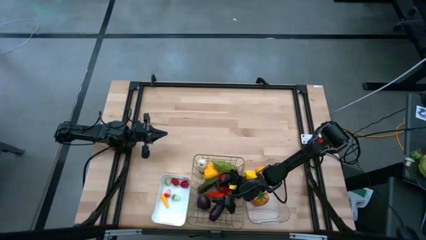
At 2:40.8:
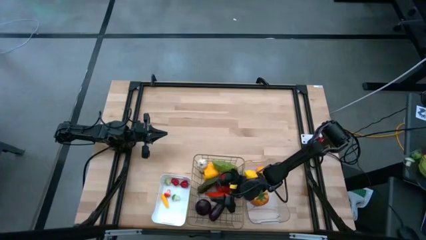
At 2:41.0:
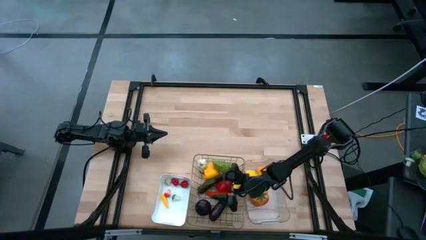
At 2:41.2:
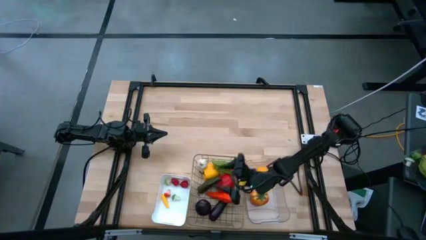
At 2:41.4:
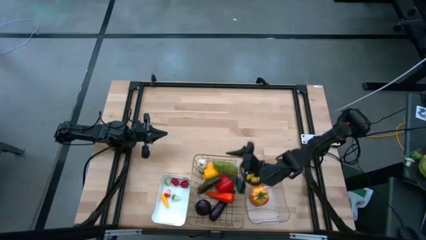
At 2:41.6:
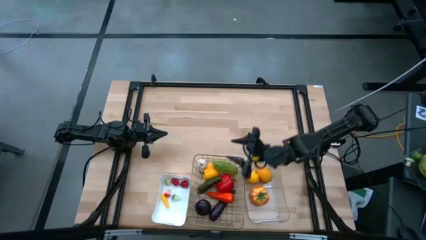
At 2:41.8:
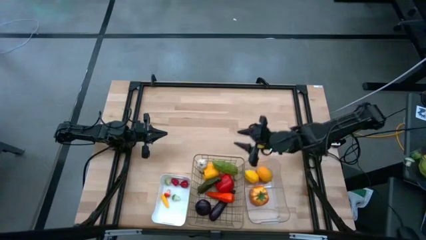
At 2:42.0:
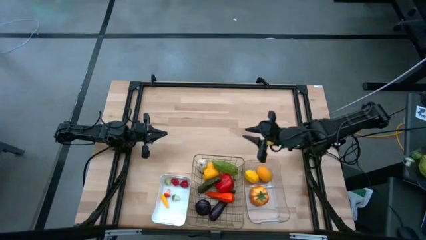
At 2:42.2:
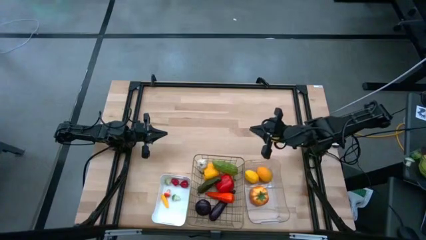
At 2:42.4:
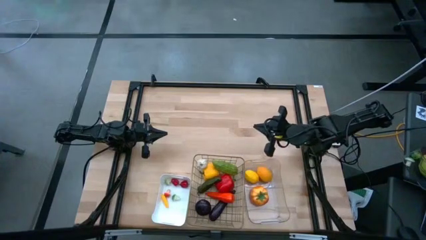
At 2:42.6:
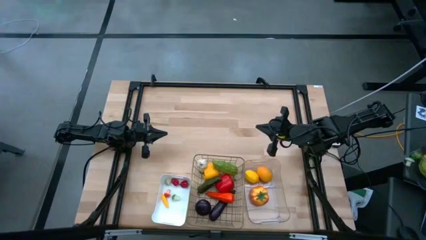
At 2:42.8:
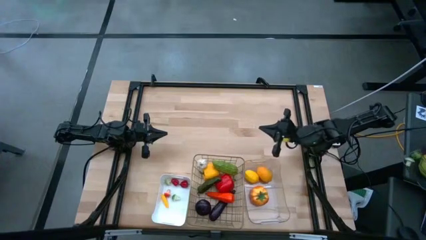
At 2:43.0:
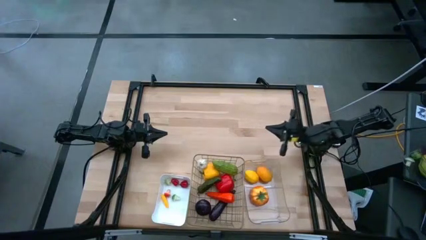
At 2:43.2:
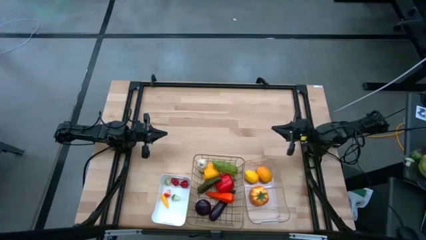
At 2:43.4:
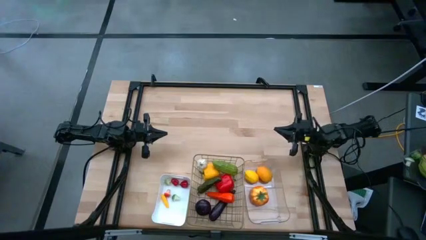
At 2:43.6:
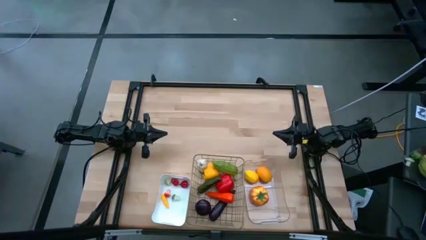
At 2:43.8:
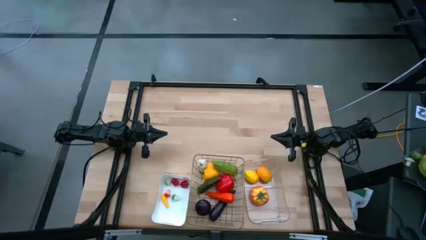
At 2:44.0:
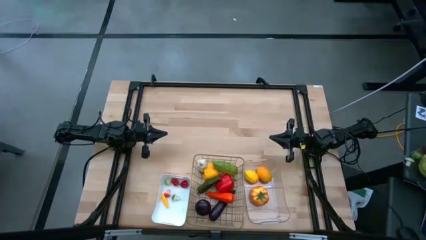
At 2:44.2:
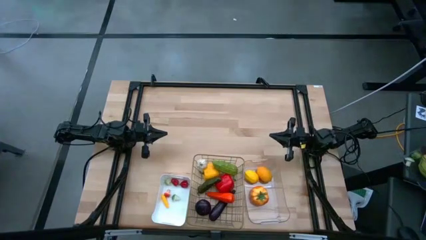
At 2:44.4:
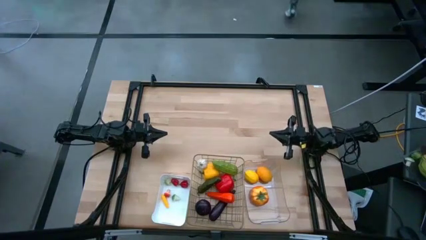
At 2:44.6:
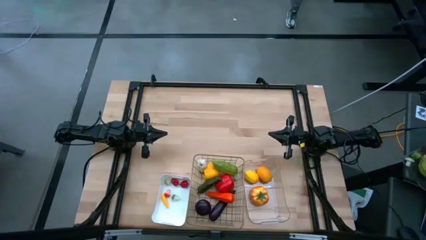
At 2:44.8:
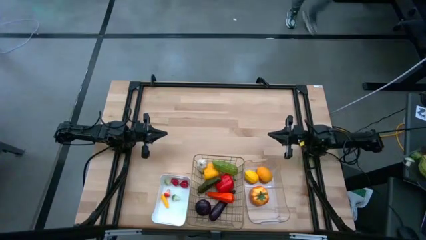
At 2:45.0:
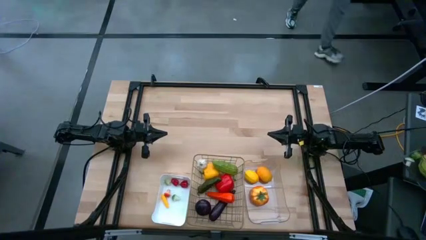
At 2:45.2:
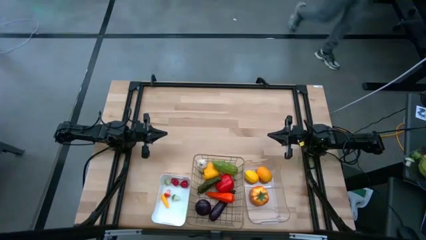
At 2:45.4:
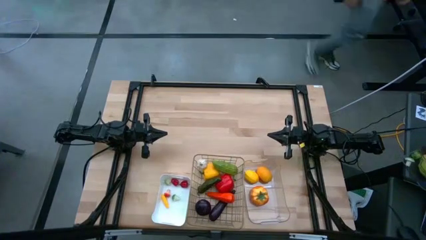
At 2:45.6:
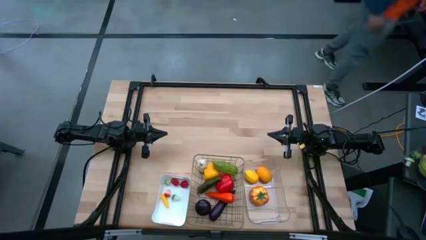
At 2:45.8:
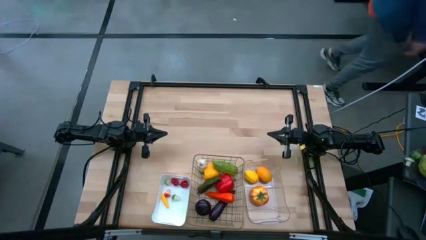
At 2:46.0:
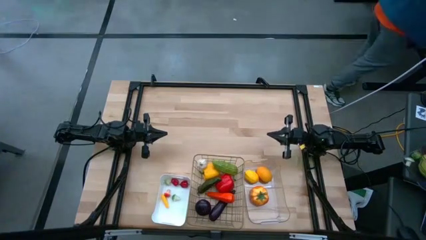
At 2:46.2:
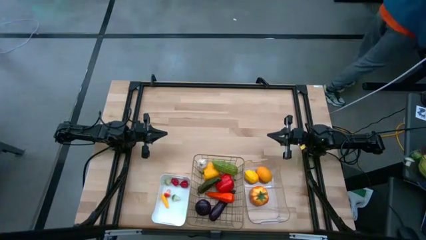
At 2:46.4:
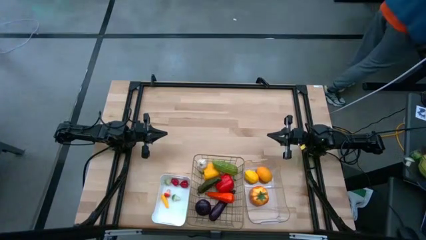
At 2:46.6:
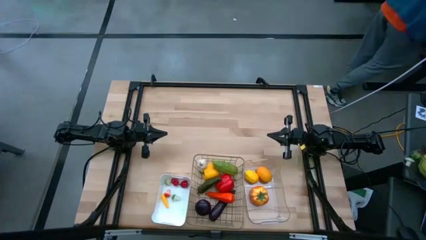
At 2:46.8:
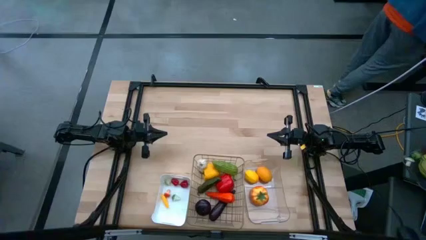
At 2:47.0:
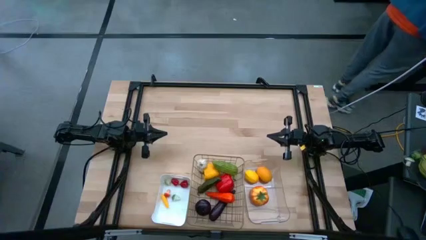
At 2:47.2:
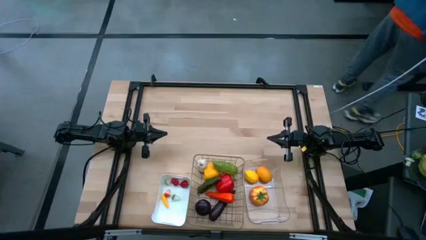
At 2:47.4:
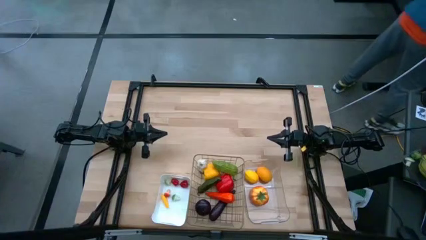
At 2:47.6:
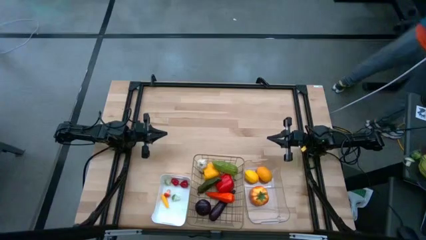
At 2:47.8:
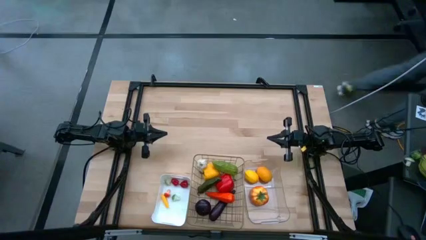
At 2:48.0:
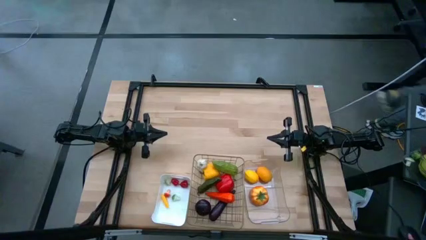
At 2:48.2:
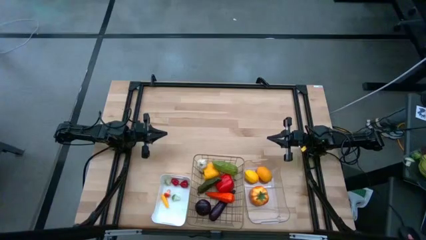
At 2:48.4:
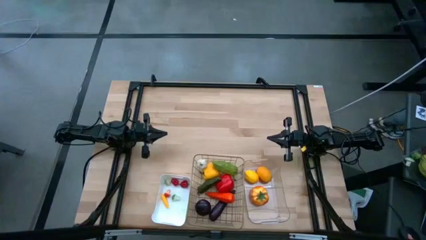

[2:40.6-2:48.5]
Task: Sort produce into baskets
Return to Home Position

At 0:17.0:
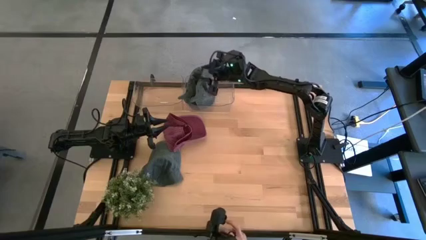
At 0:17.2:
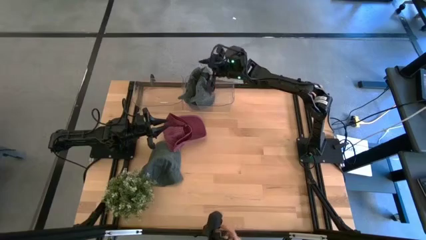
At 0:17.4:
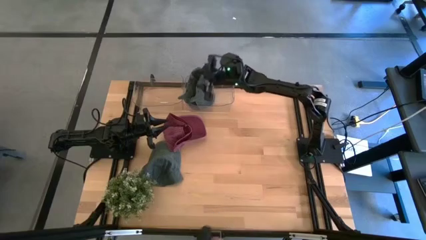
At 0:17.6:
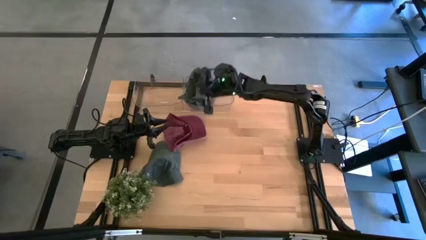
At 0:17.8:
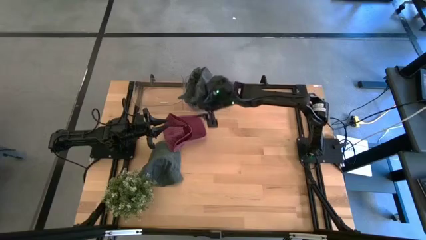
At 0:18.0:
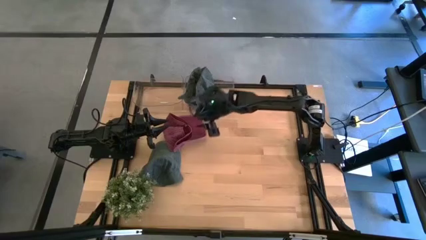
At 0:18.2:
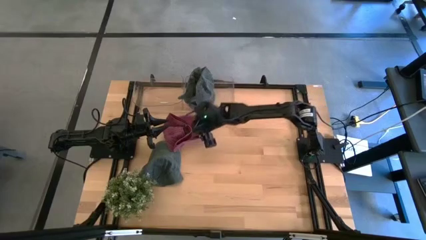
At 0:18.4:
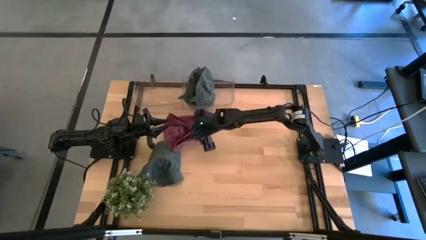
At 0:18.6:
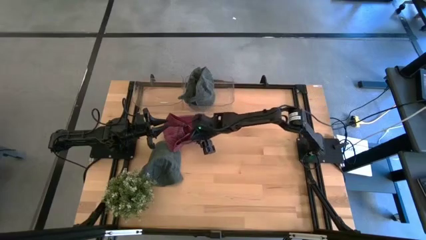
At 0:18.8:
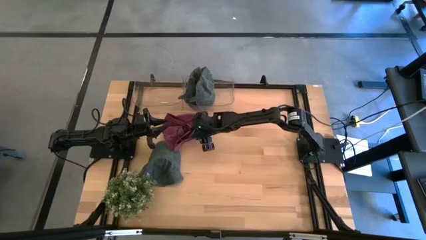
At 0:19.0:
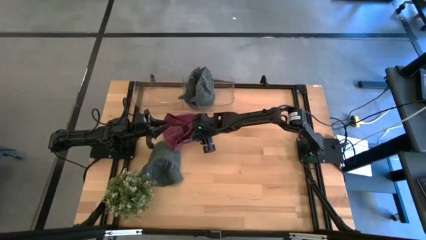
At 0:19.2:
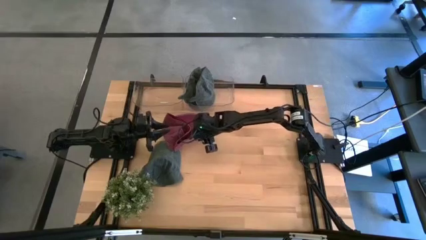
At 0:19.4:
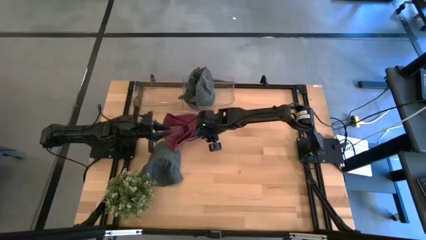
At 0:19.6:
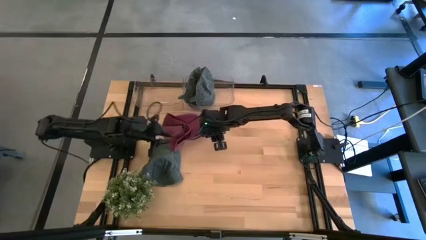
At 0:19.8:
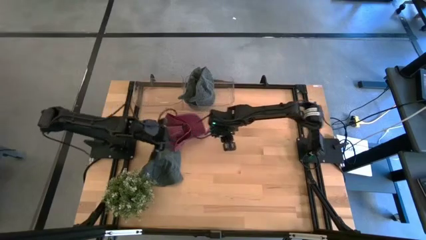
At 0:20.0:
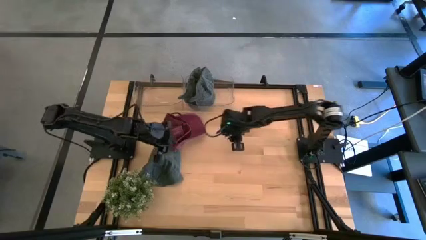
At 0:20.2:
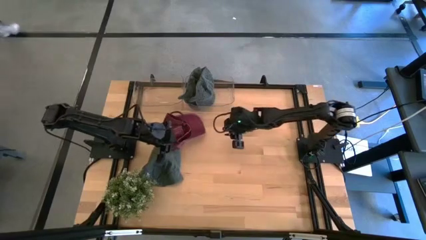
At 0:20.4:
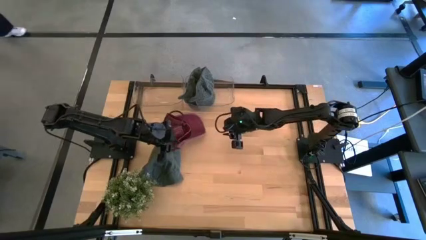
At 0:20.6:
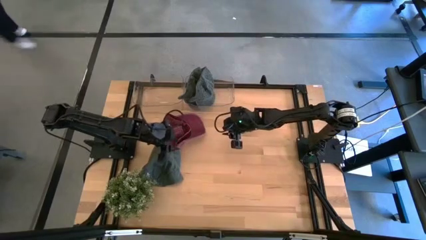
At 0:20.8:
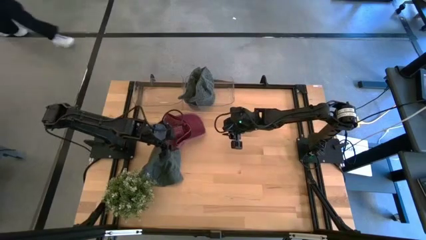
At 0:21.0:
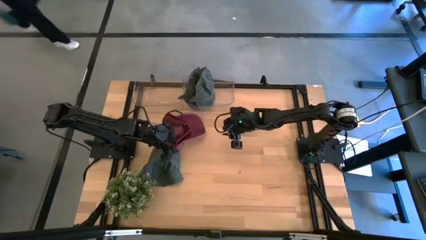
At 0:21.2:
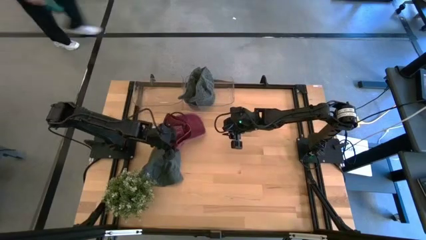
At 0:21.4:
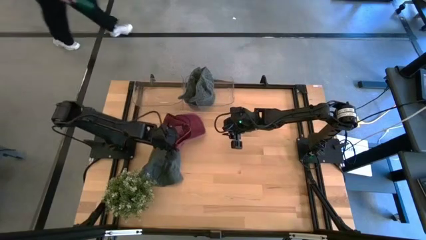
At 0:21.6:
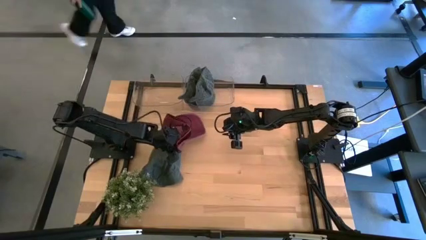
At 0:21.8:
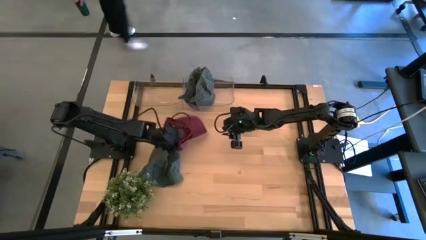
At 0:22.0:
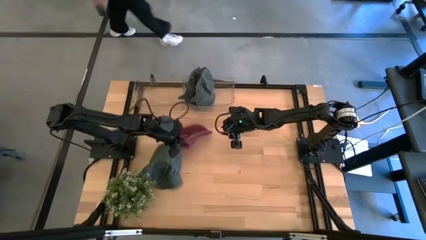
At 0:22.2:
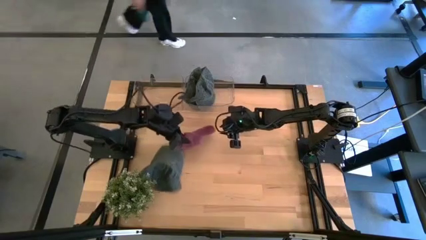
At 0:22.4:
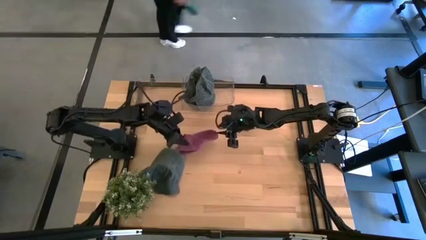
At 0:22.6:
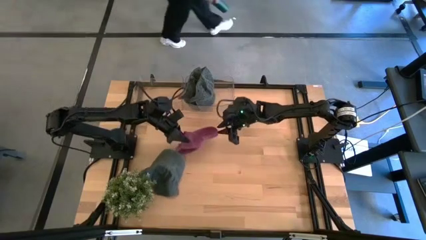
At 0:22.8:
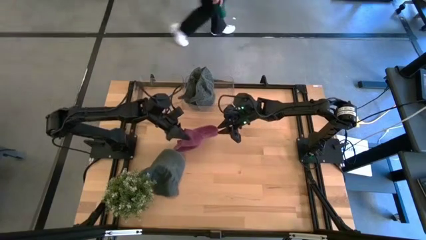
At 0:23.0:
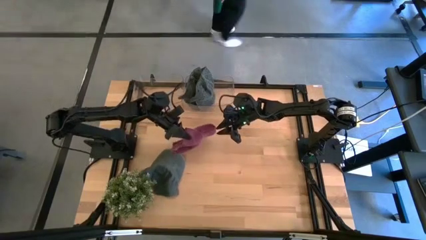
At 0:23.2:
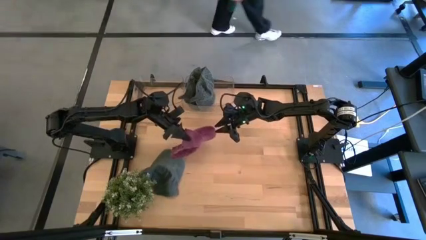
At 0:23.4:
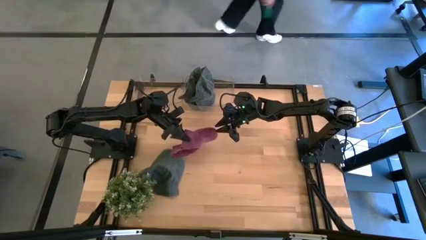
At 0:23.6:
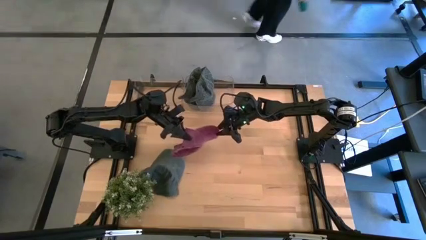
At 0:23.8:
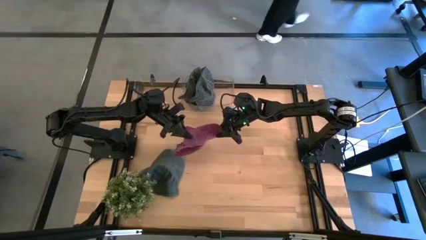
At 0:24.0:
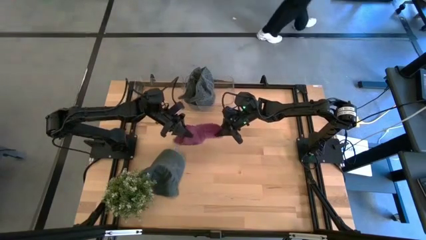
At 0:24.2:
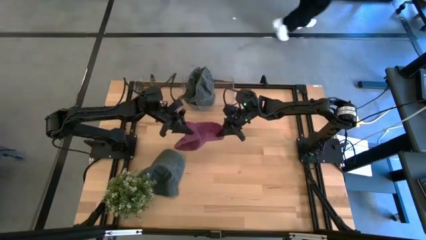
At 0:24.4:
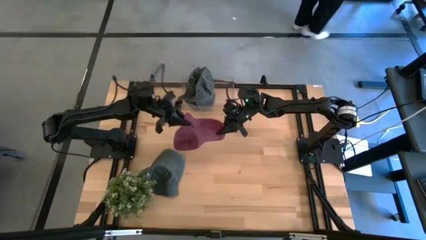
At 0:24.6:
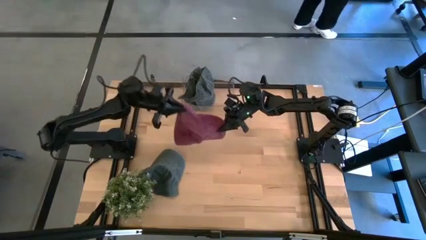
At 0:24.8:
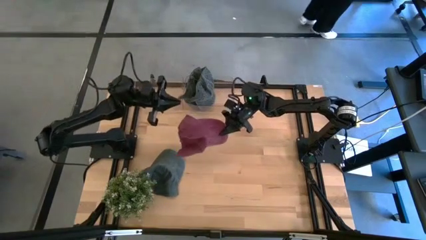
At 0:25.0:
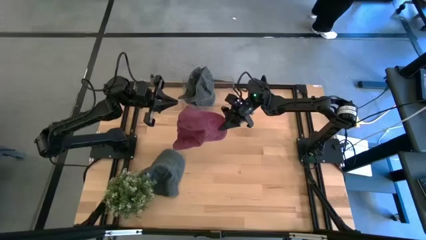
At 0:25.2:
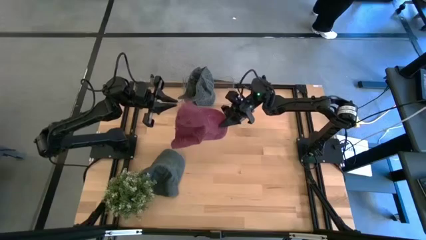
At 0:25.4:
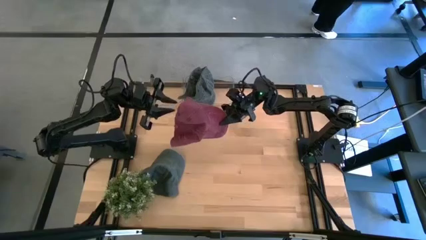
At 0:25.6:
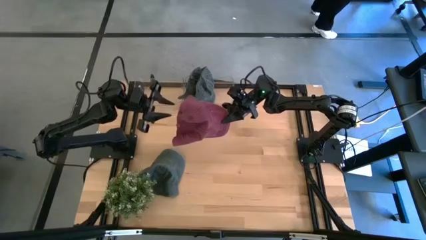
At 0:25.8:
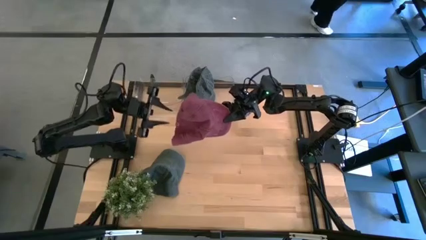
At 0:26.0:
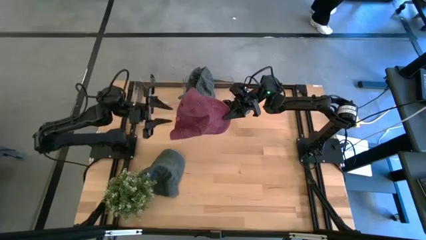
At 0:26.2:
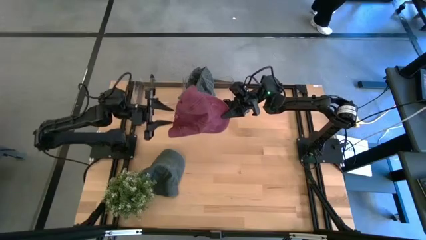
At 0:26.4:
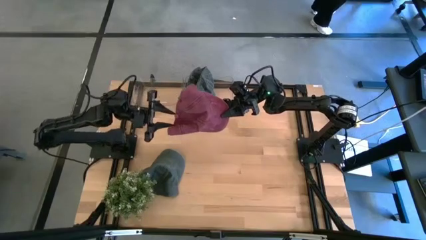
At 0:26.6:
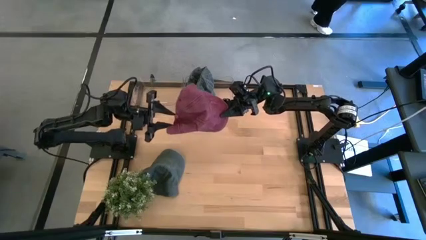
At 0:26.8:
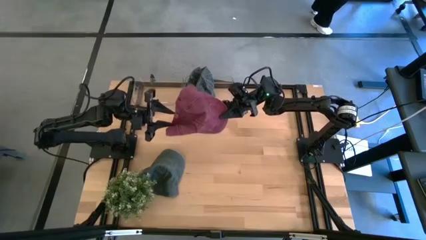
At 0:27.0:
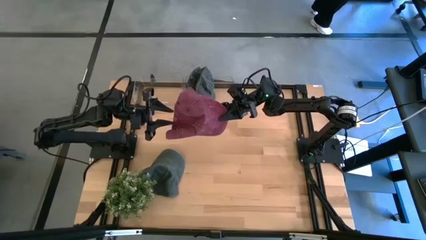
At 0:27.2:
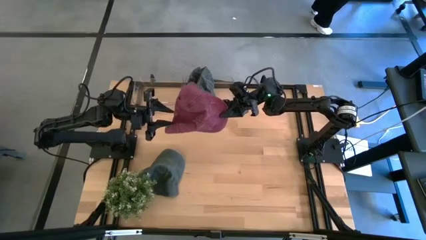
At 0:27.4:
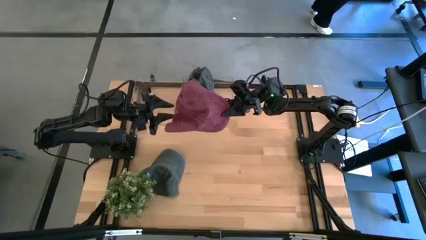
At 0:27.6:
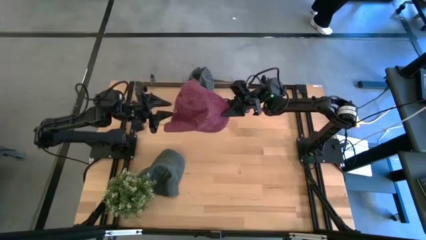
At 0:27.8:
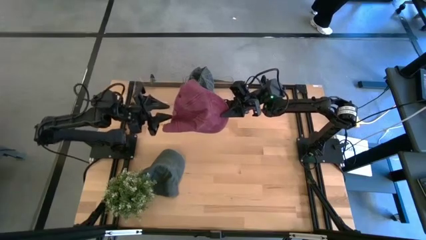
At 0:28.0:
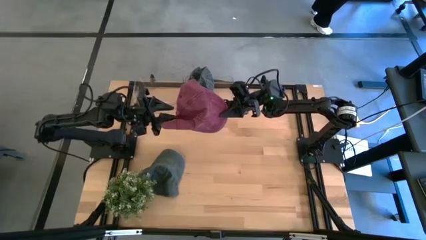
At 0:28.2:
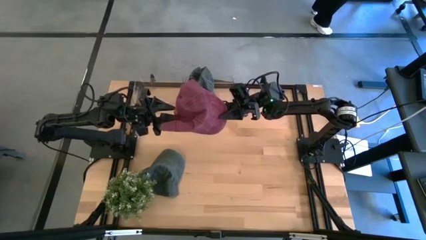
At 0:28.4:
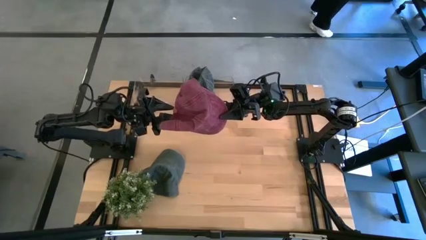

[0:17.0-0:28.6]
Task: Pick and place caps into container
Put the red cap into the left transparent container
